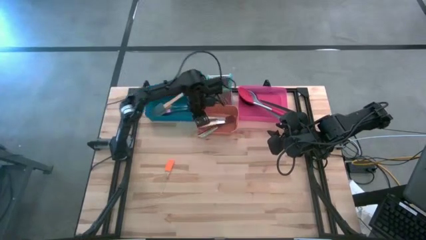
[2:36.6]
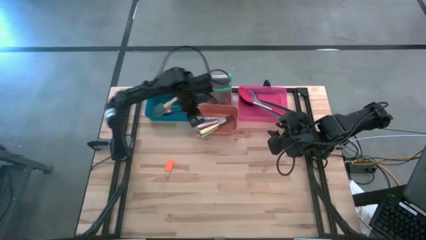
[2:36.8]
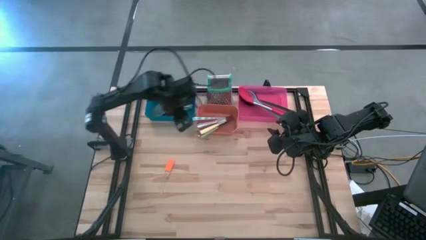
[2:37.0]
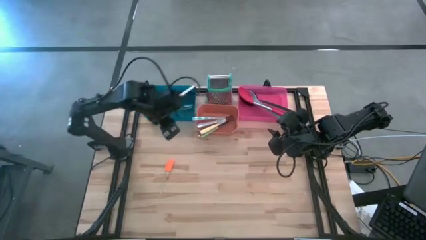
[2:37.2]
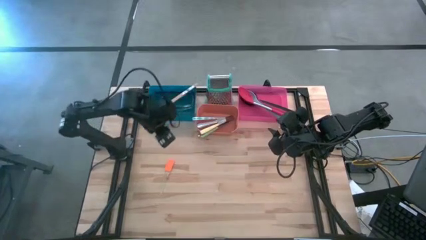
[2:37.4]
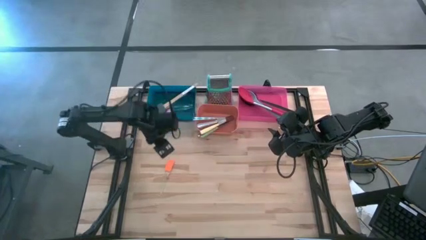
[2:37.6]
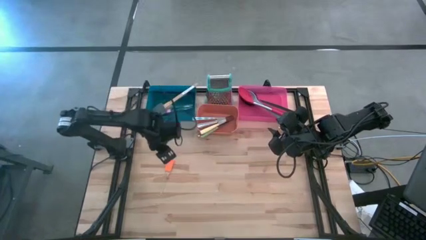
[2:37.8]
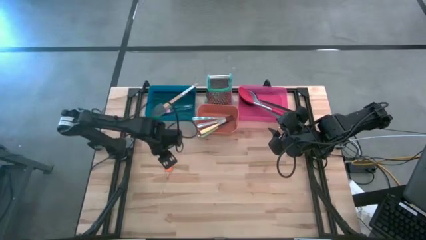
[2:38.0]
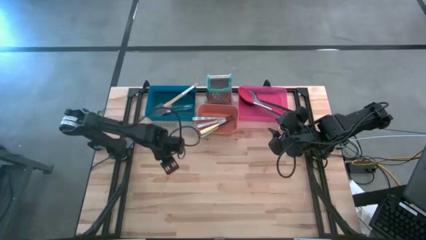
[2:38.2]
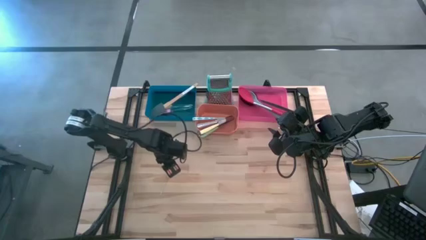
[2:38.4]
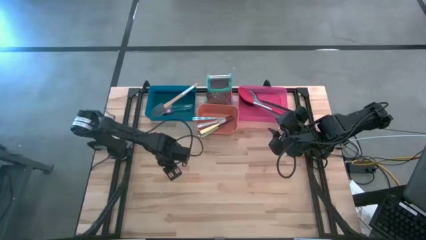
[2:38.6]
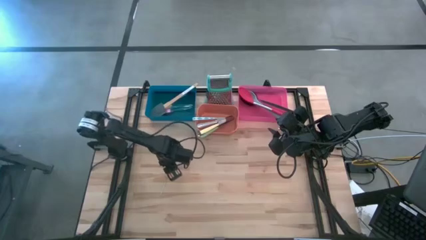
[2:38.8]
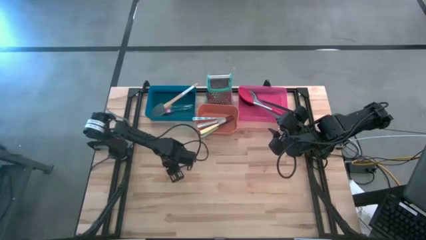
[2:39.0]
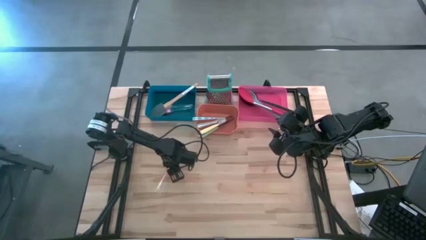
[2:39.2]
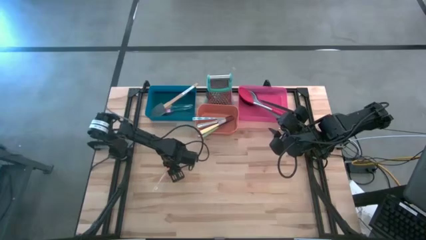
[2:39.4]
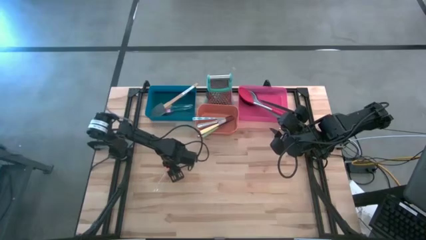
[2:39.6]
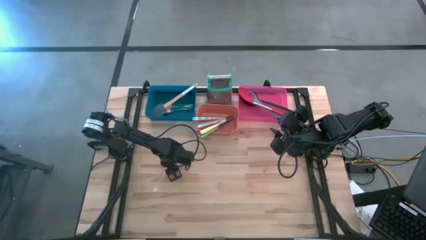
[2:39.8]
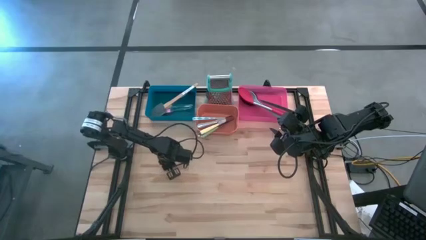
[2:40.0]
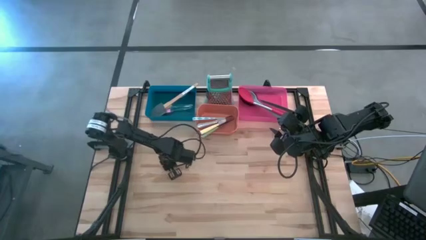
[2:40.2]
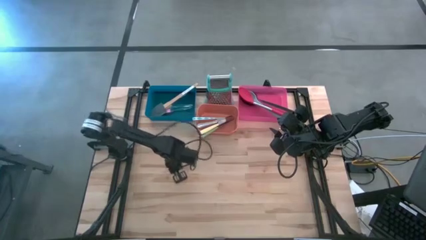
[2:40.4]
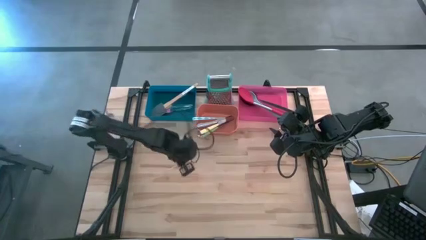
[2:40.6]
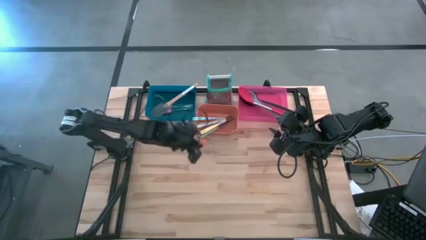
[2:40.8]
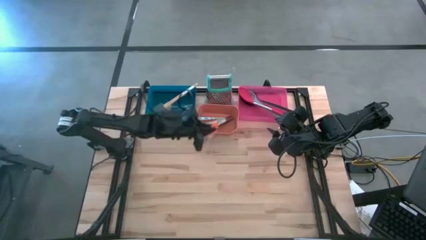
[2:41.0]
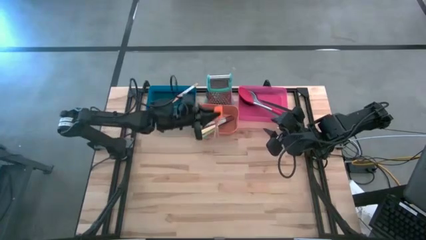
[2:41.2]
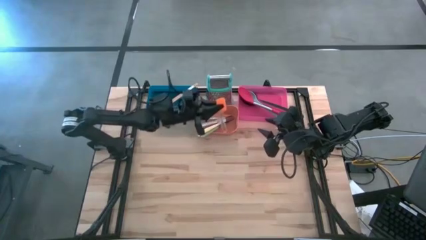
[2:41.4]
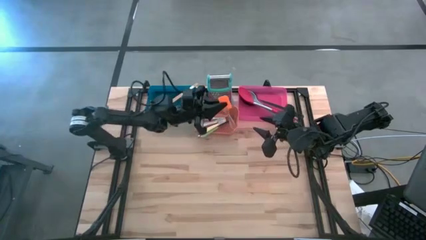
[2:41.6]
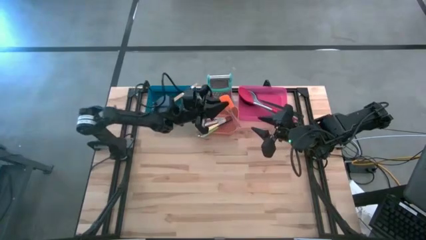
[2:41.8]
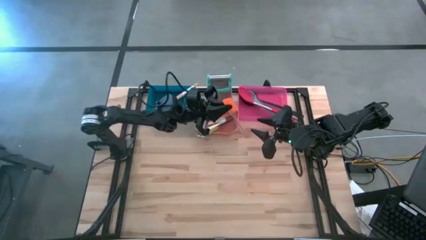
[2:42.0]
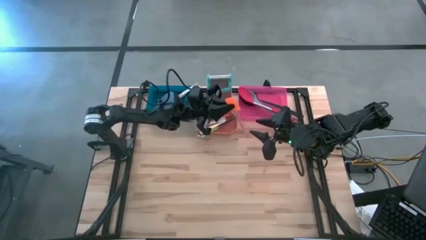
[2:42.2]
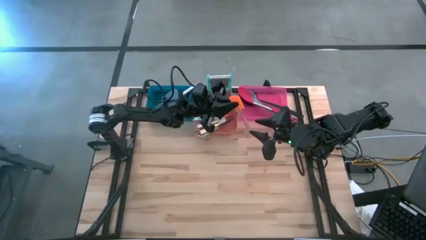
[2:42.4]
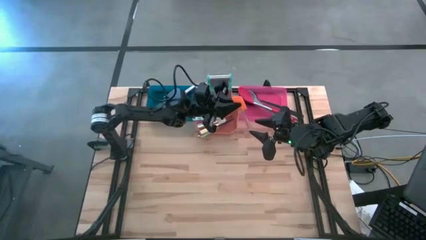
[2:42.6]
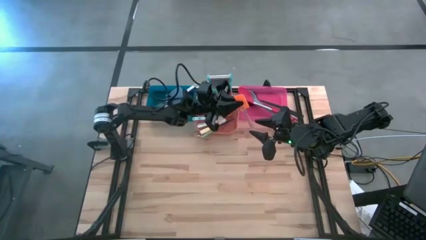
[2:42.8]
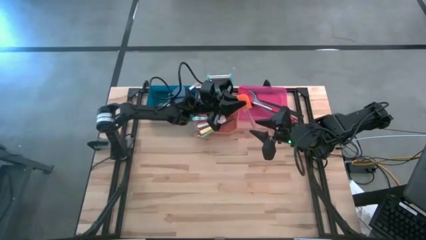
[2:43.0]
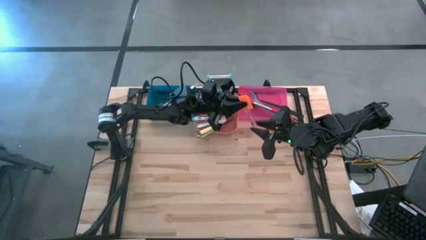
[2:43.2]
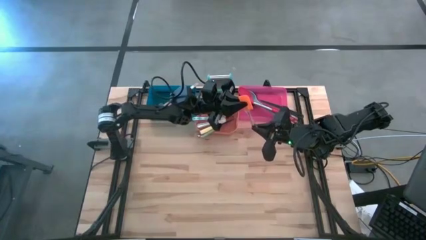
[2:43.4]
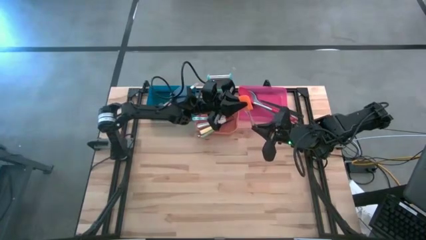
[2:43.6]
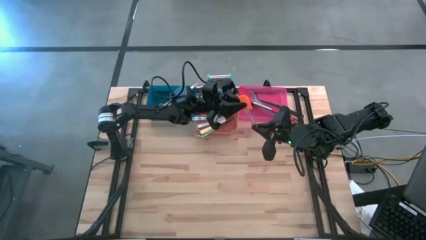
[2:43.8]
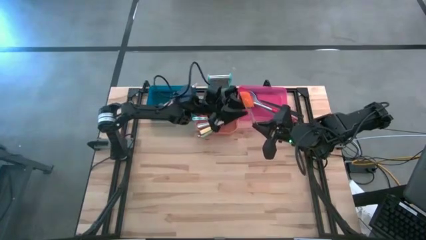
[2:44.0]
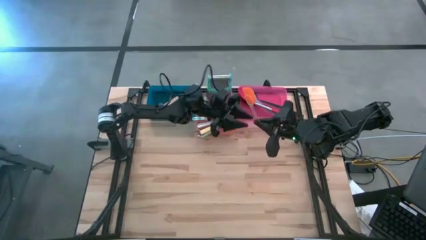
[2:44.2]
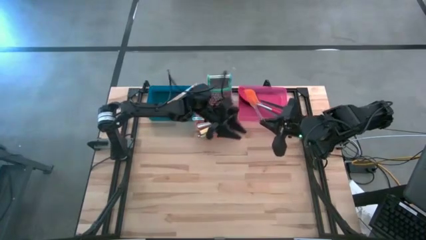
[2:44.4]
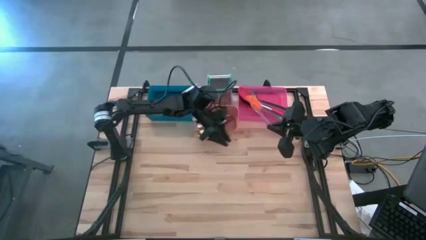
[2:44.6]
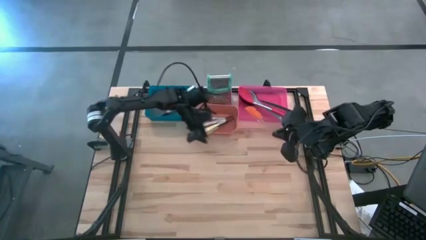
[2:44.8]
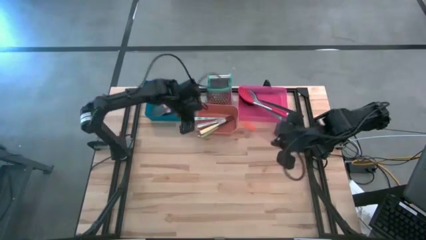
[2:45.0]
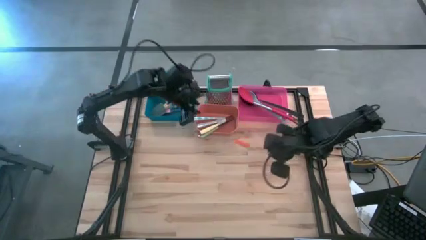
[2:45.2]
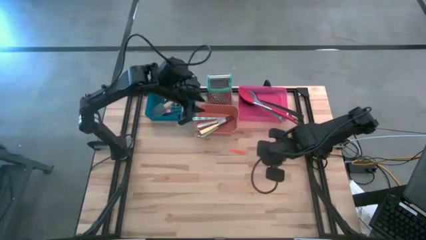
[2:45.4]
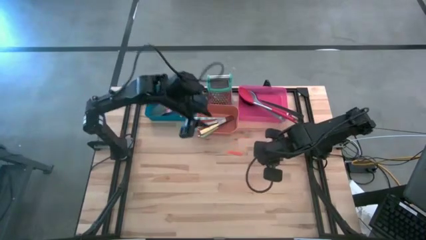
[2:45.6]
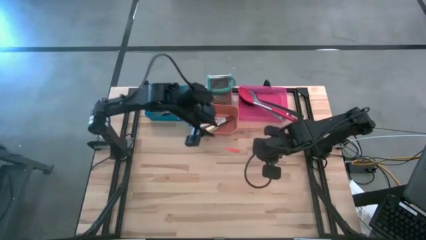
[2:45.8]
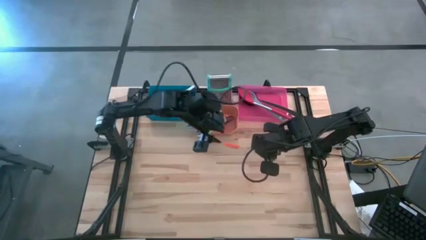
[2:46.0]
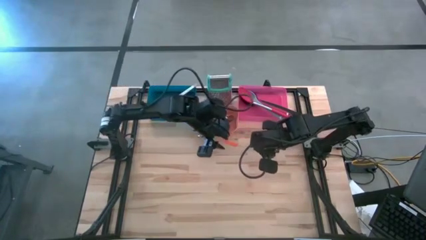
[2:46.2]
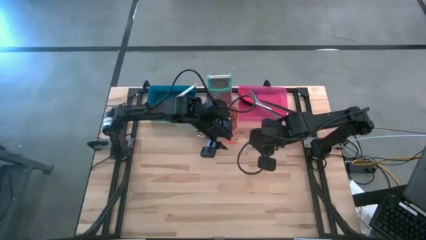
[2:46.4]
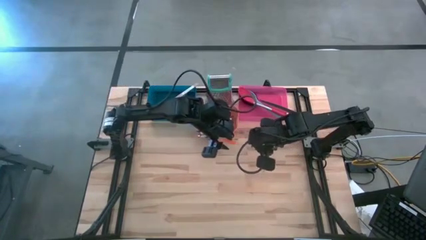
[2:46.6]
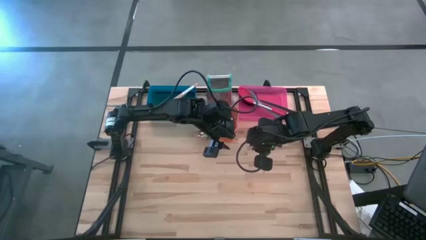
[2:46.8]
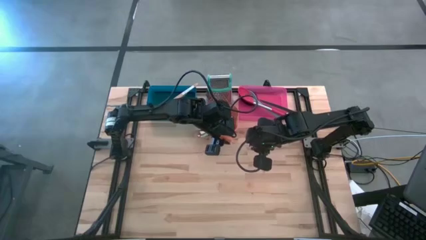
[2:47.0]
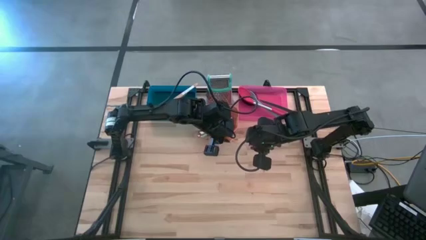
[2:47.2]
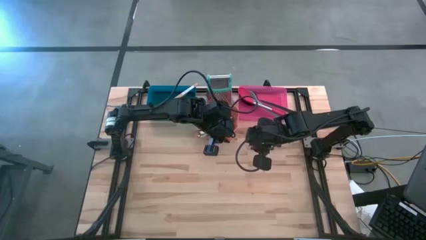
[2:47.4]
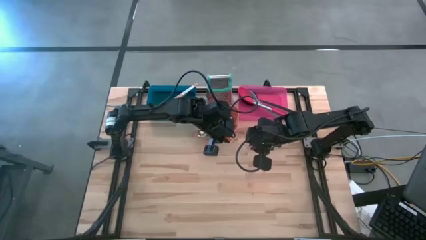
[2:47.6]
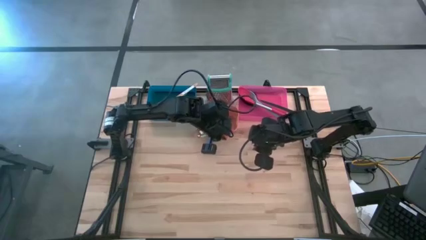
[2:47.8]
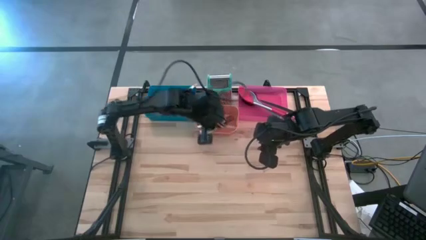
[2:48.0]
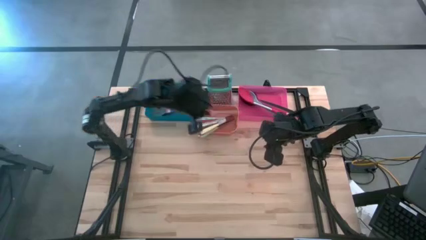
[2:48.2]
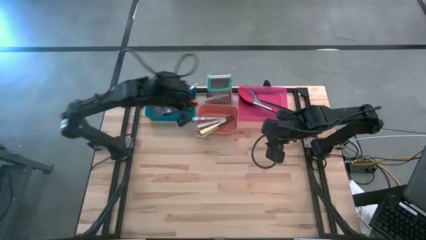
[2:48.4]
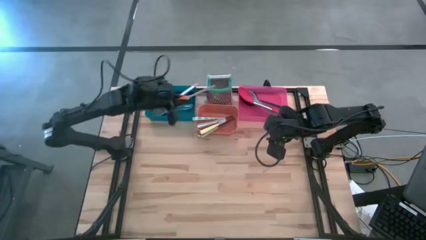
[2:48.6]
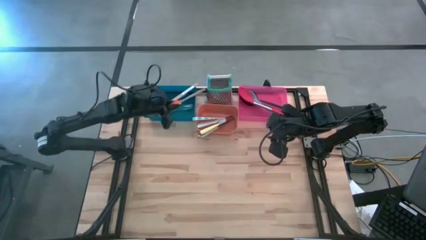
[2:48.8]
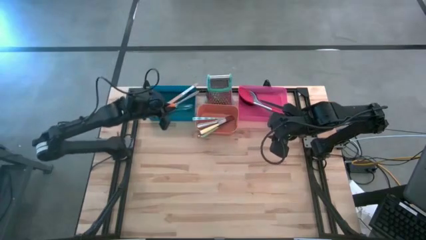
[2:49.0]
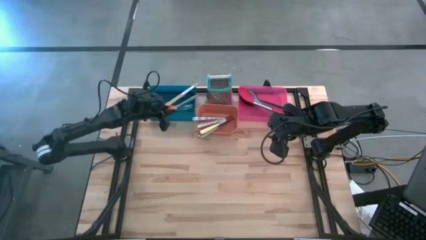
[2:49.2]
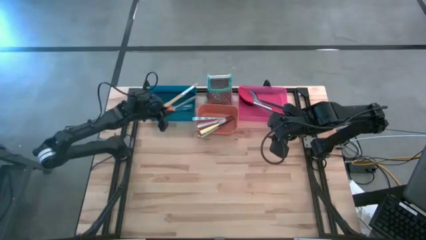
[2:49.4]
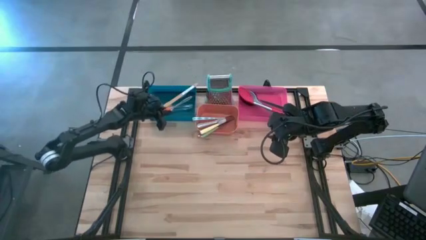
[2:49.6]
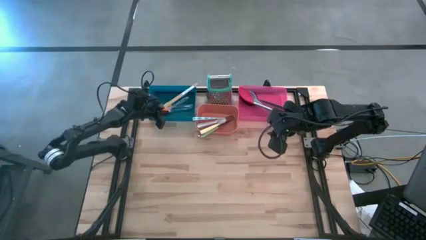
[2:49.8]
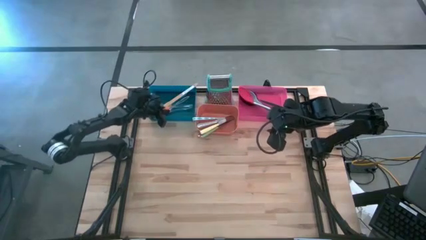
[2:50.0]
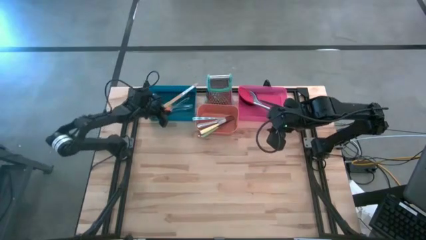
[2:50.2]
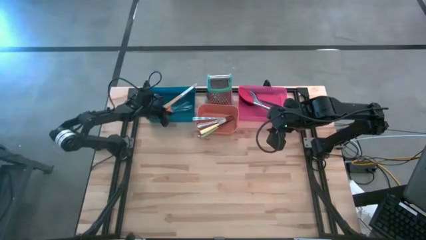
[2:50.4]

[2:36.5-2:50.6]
Task: Pick & Place Kitchen Items
Put the orange spatula into the blue bin

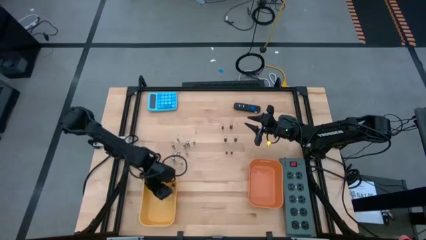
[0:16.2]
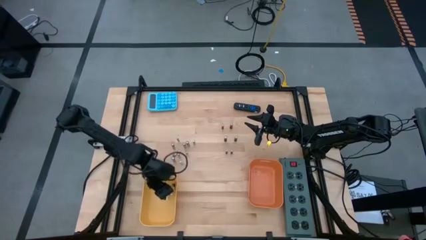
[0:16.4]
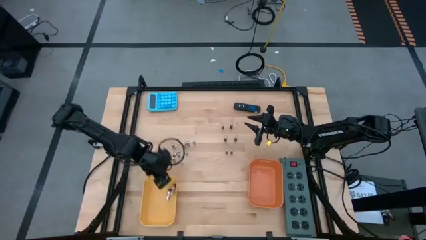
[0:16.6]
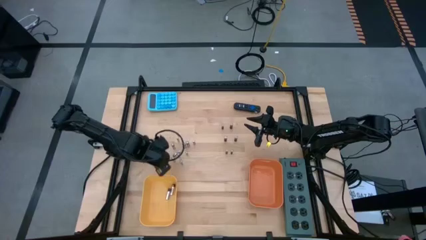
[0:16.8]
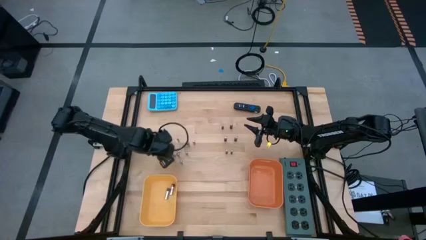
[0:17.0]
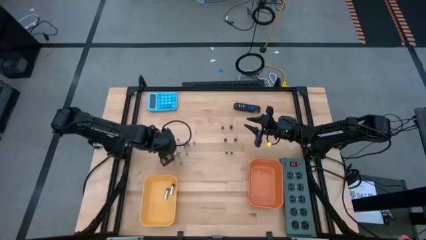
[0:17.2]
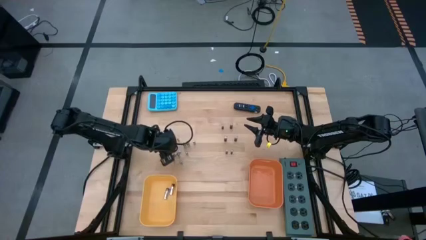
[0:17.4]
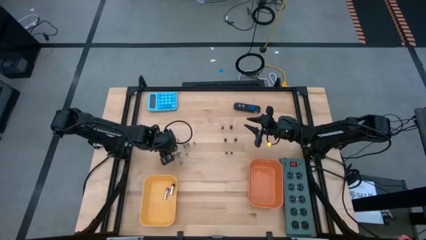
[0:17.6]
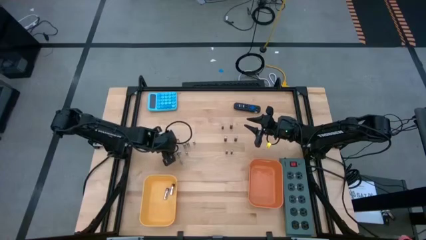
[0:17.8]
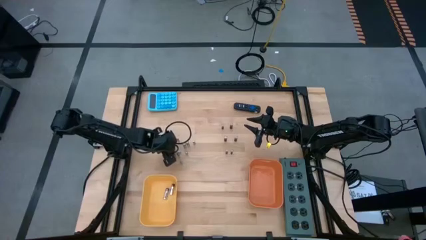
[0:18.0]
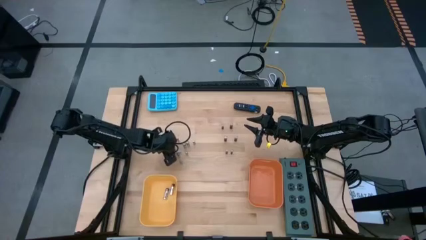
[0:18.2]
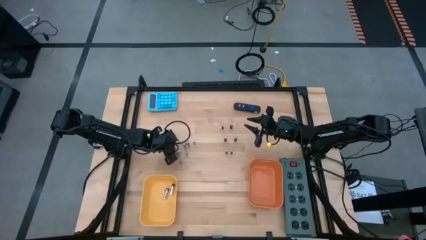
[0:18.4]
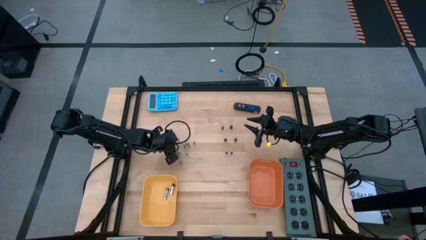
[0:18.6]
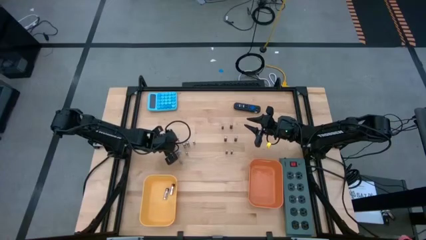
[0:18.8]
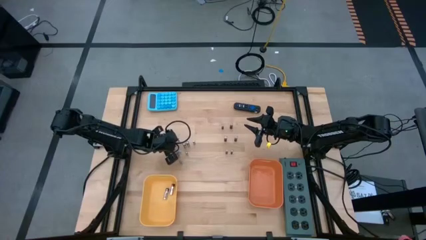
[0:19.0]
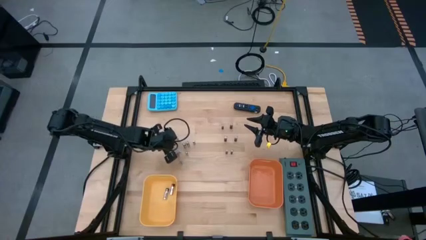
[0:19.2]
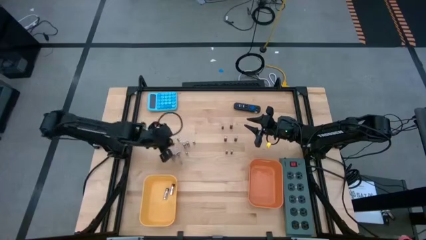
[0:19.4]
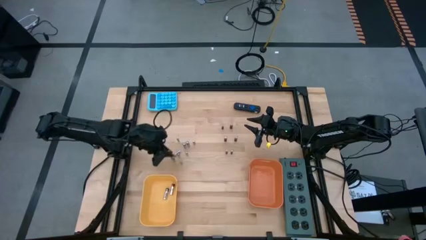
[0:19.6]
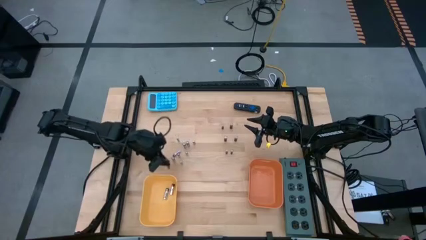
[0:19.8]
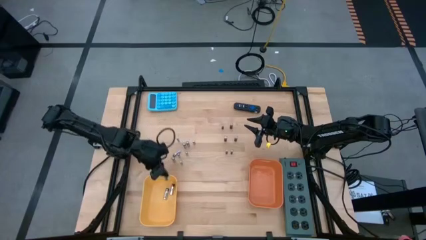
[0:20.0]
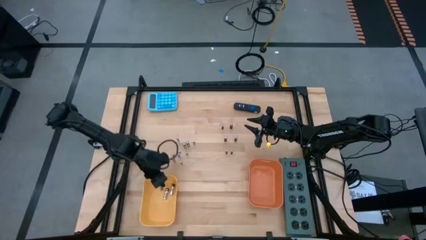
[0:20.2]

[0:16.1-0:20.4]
Task: Sort batteries
Put the silver battery into the yellow bin
